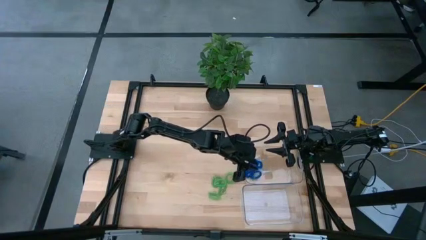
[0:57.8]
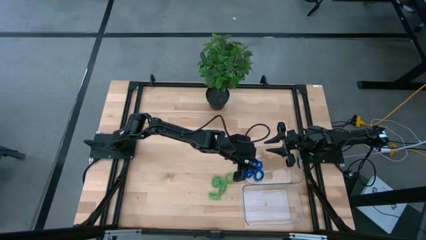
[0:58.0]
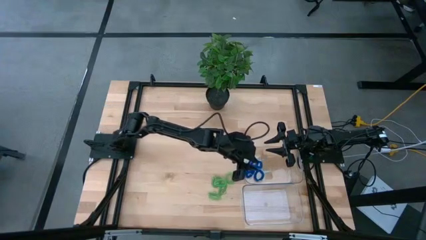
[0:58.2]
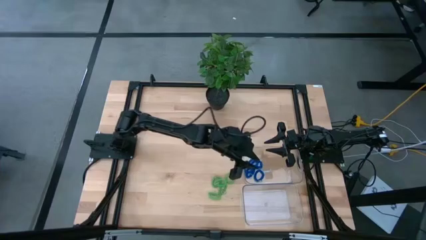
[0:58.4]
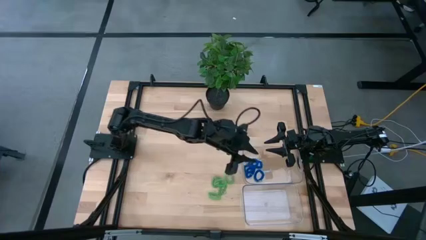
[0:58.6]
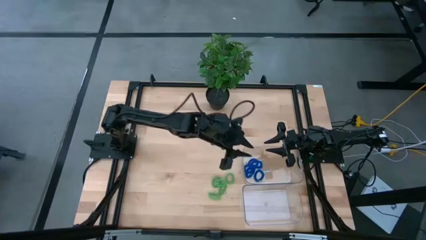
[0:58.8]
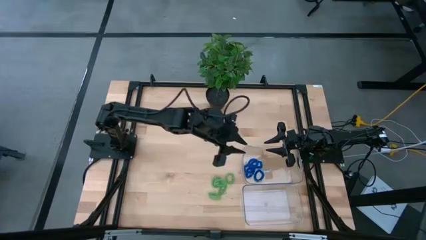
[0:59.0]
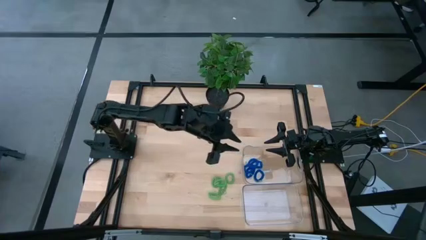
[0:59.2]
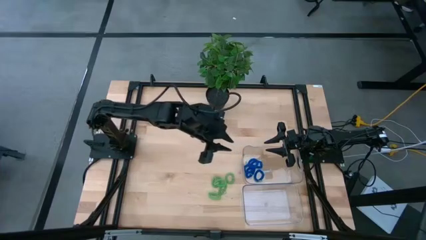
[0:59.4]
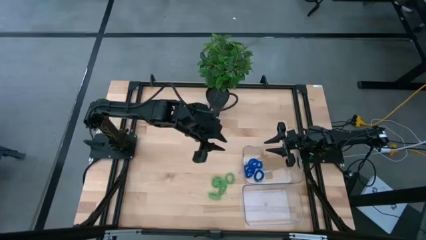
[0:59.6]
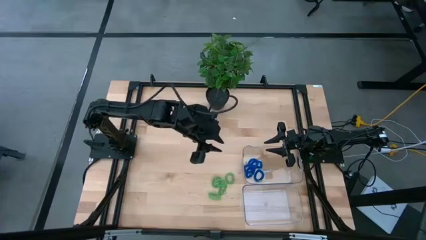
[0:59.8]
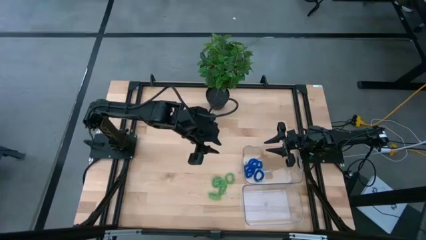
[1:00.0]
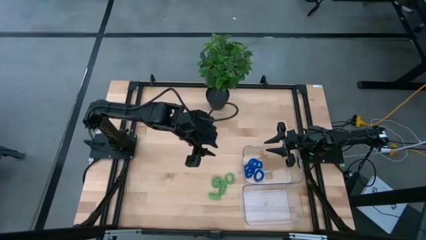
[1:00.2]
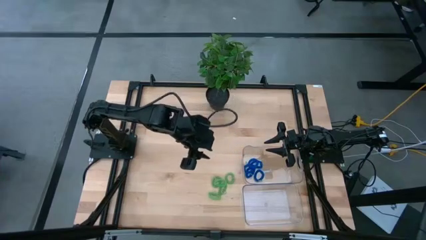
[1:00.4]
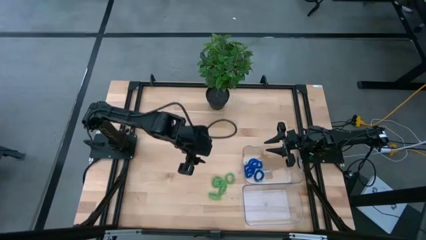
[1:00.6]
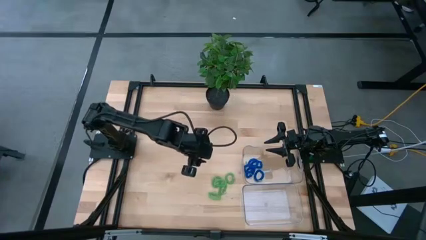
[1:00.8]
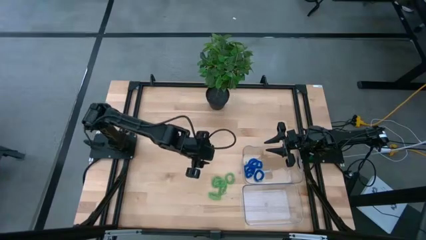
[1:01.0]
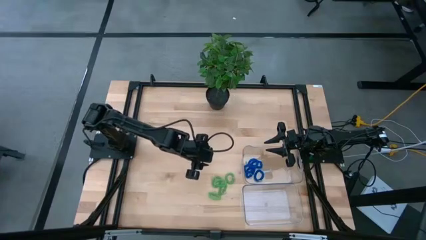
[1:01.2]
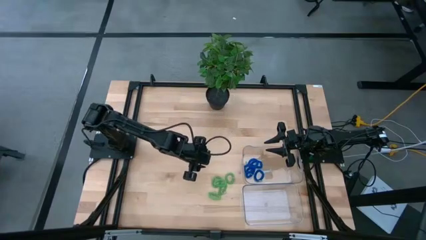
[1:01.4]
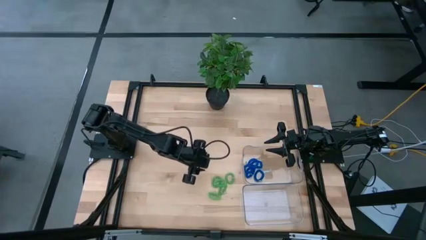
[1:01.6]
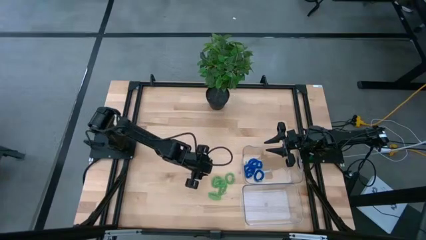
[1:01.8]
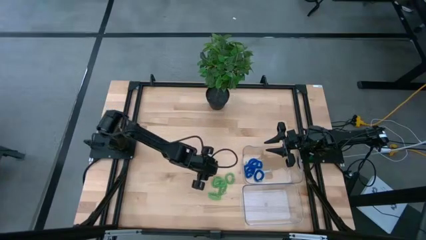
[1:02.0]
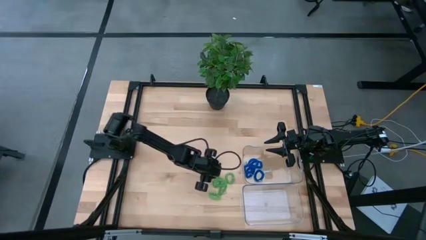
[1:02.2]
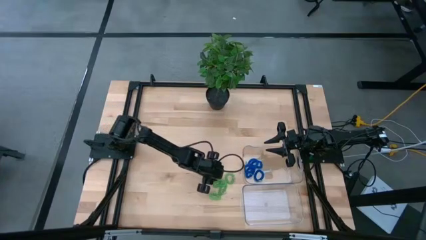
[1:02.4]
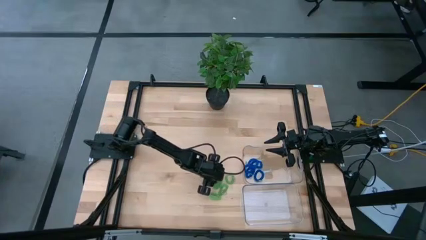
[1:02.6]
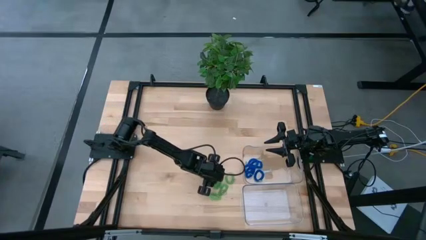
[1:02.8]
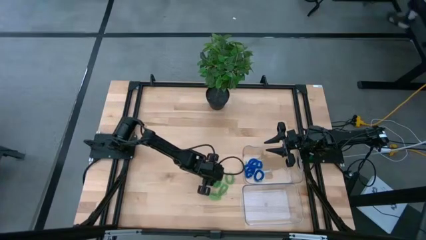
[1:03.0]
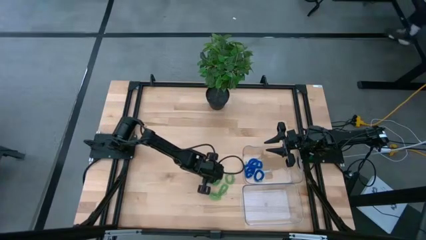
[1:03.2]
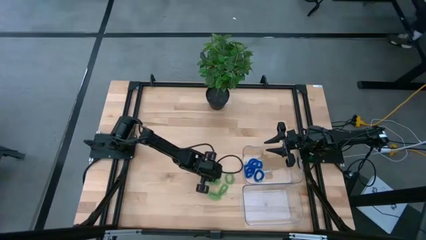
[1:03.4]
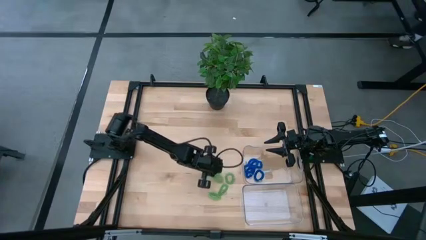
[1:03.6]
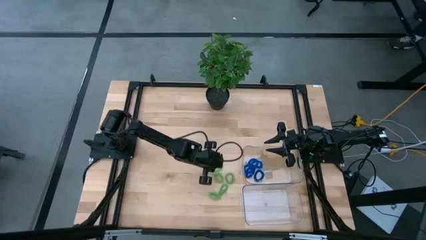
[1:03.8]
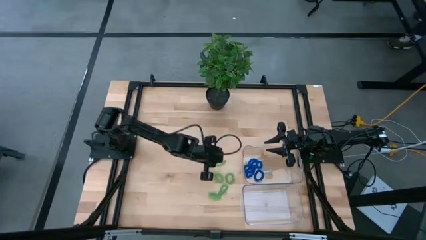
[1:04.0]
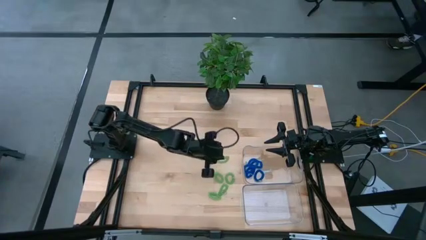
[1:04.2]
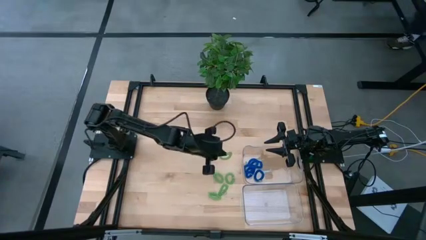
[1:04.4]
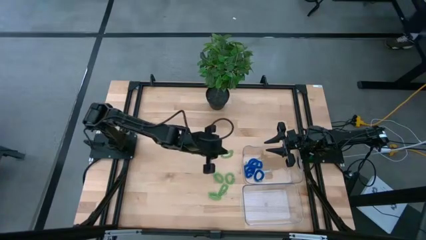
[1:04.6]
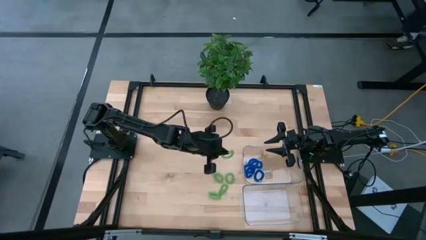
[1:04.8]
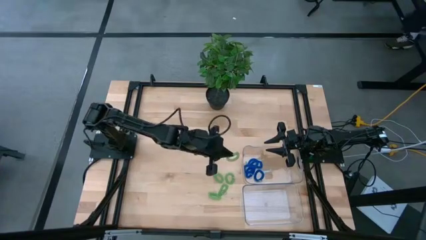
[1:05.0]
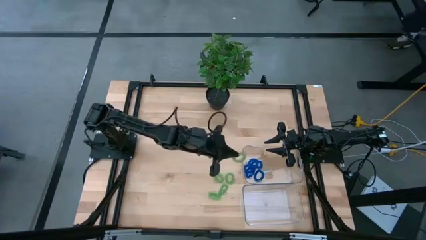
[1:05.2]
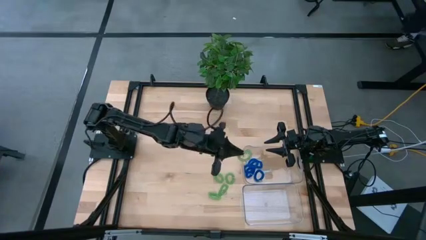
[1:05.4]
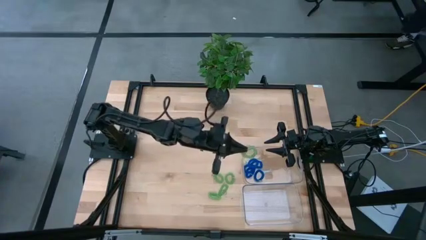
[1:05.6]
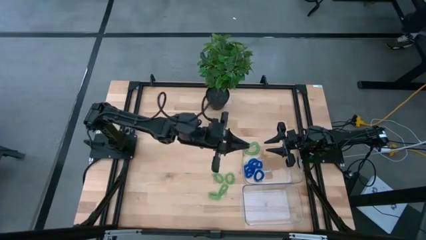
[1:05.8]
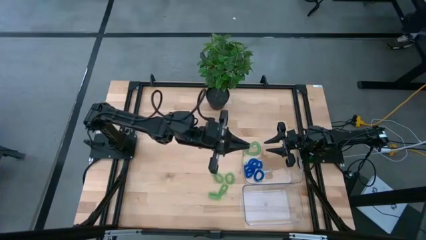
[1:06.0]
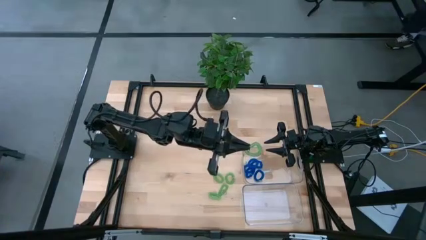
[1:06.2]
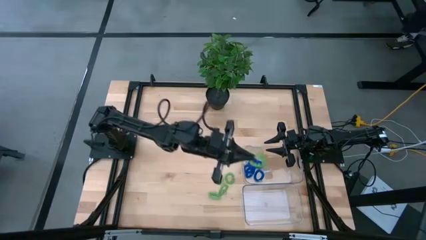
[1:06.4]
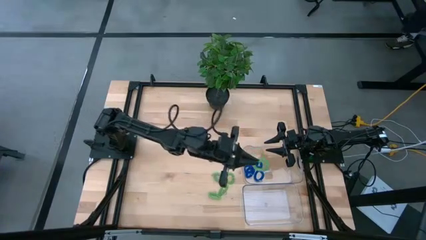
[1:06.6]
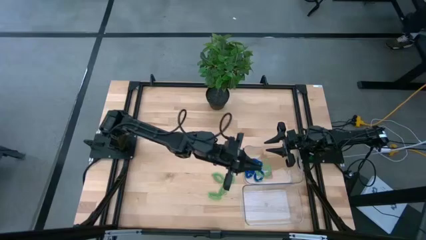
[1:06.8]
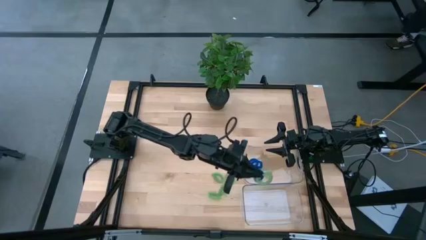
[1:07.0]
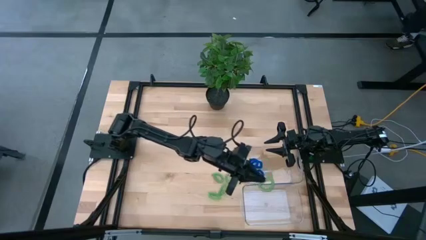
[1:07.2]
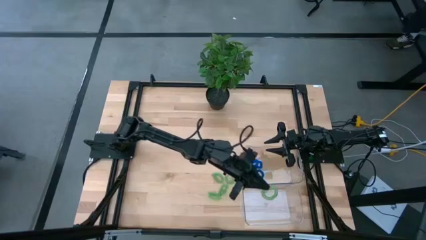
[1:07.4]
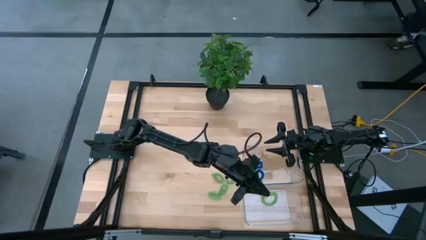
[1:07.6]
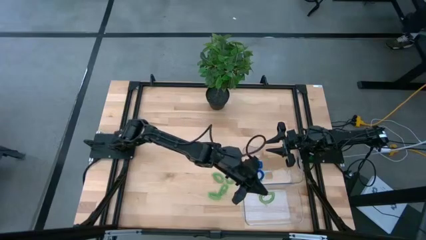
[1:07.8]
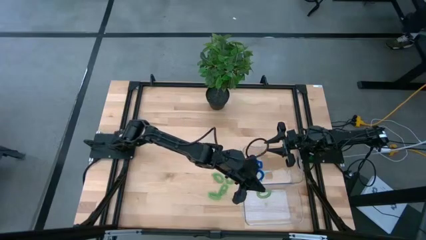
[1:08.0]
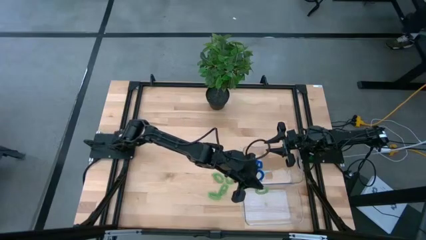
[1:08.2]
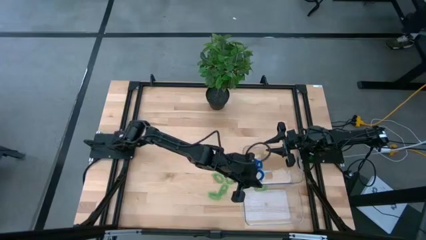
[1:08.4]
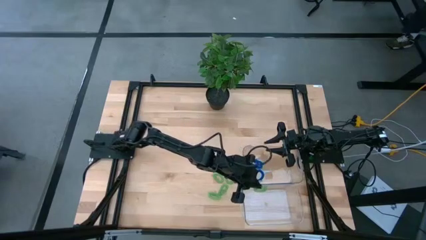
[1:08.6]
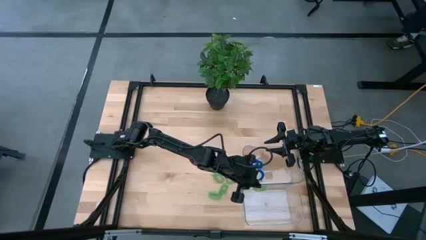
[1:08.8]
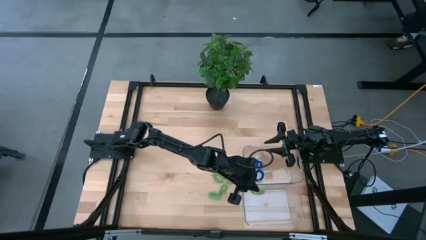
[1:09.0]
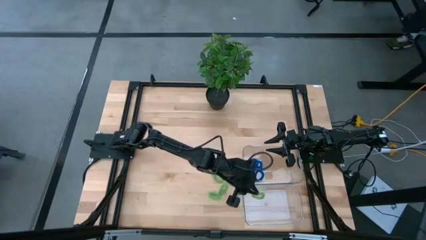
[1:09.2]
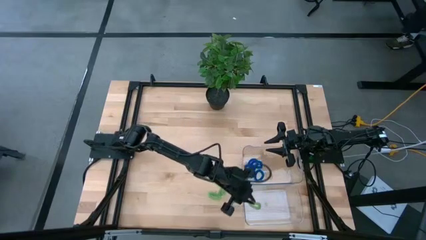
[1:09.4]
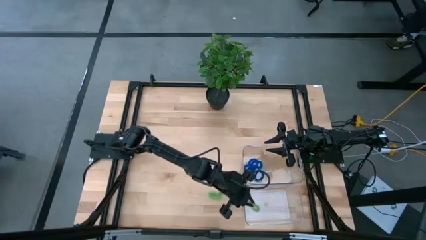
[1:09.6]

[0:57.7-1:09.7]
Task: Sort spring keychains
Put the green spring keychain in the bottom transparent bin
